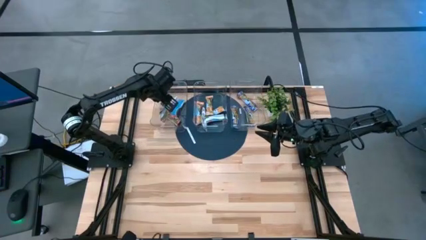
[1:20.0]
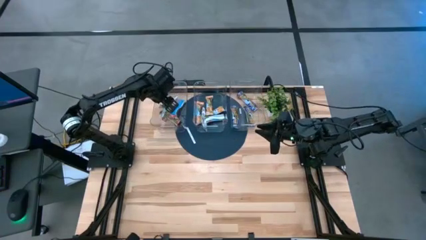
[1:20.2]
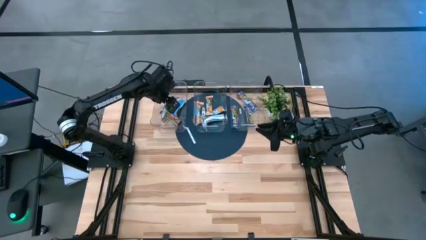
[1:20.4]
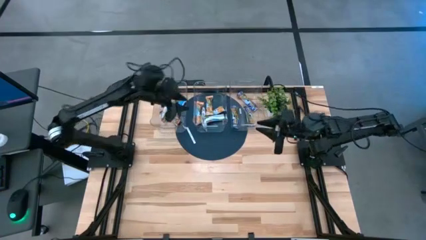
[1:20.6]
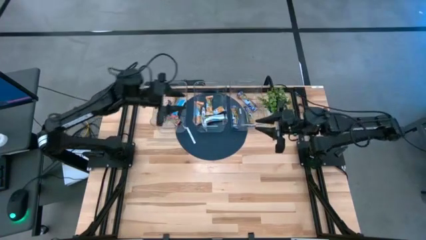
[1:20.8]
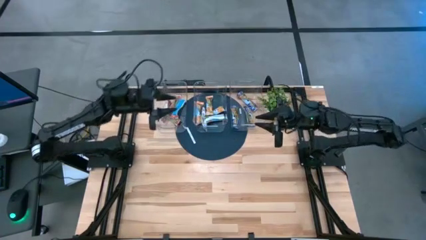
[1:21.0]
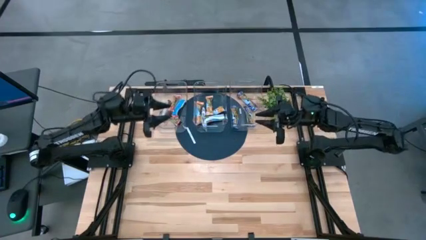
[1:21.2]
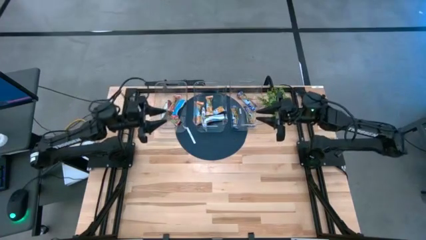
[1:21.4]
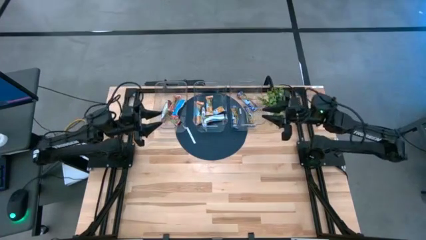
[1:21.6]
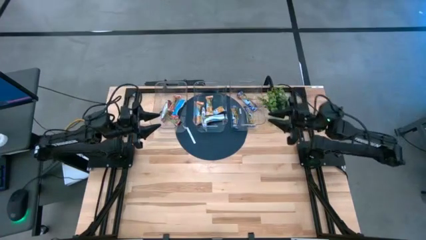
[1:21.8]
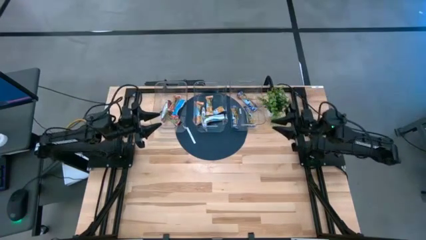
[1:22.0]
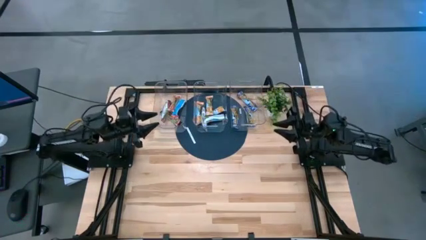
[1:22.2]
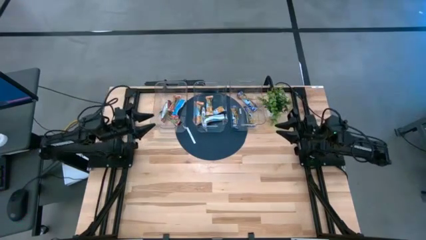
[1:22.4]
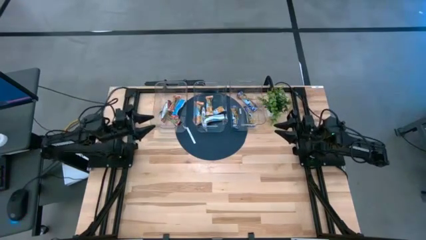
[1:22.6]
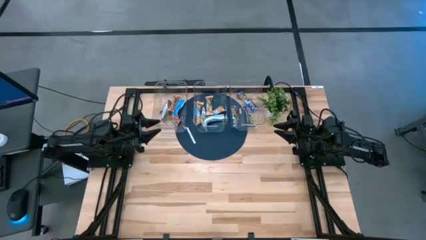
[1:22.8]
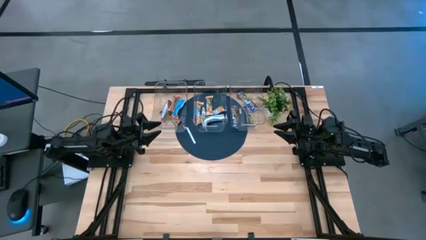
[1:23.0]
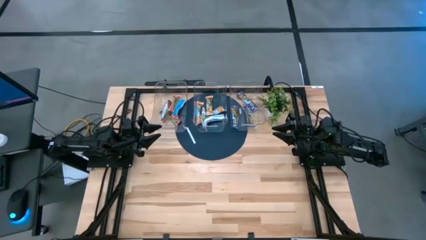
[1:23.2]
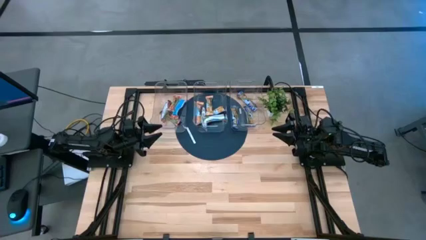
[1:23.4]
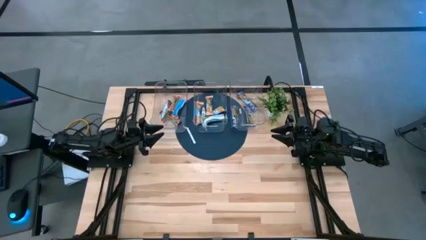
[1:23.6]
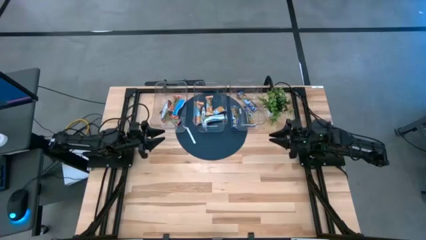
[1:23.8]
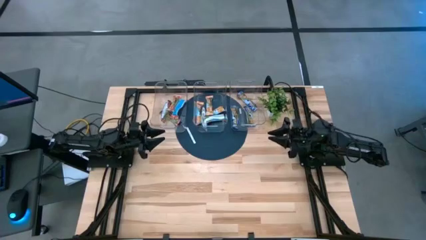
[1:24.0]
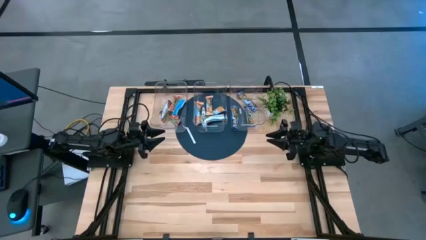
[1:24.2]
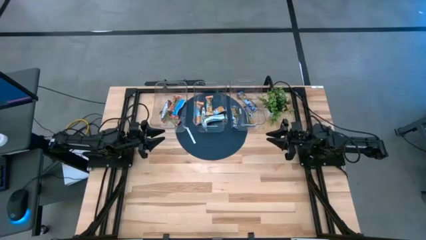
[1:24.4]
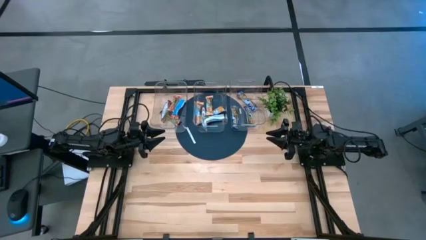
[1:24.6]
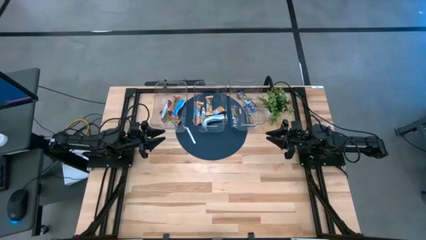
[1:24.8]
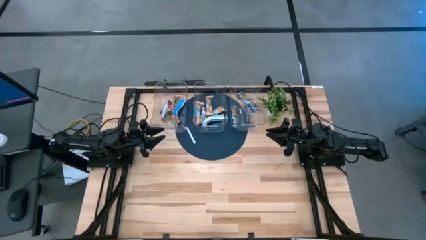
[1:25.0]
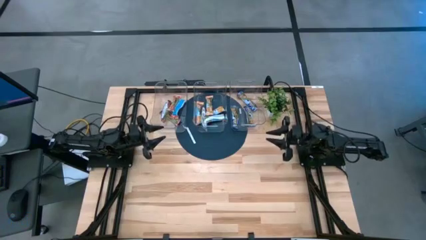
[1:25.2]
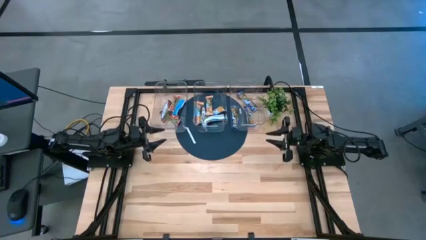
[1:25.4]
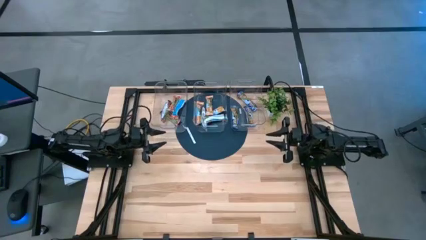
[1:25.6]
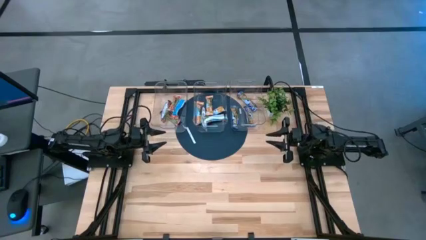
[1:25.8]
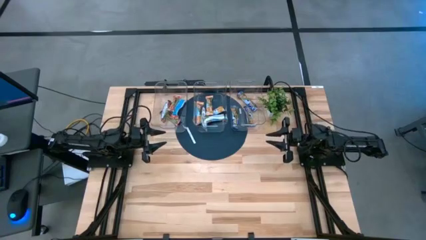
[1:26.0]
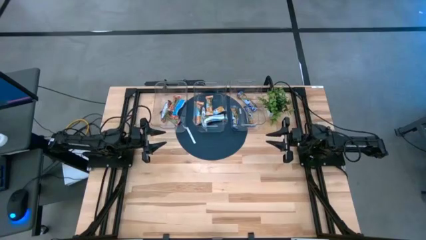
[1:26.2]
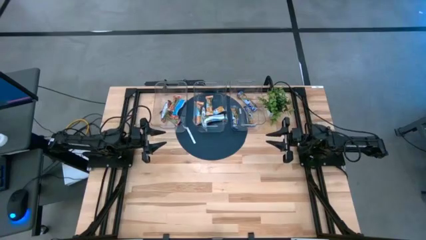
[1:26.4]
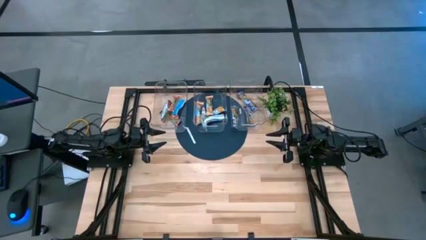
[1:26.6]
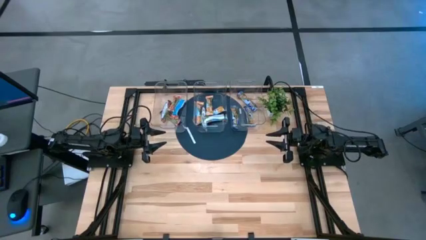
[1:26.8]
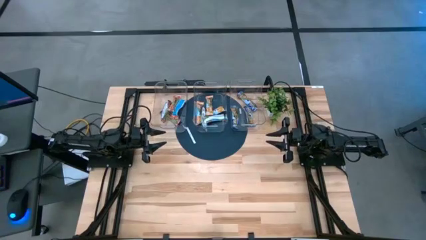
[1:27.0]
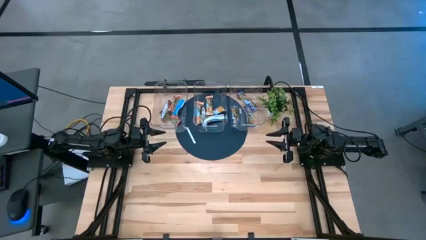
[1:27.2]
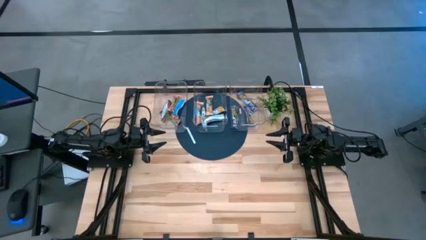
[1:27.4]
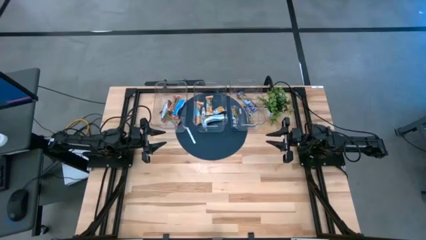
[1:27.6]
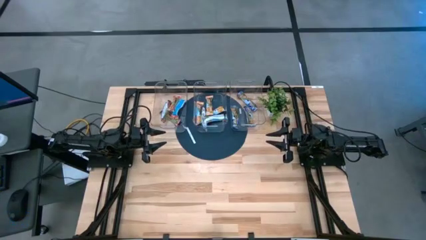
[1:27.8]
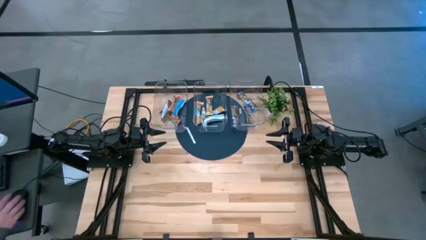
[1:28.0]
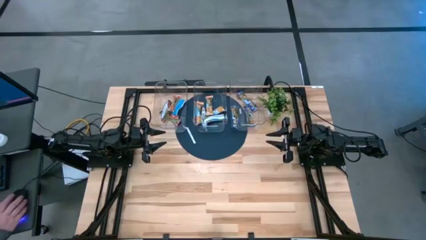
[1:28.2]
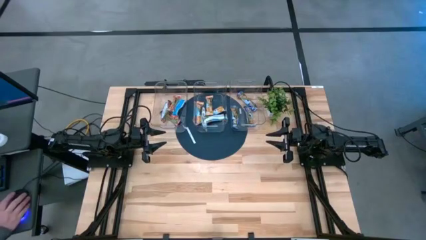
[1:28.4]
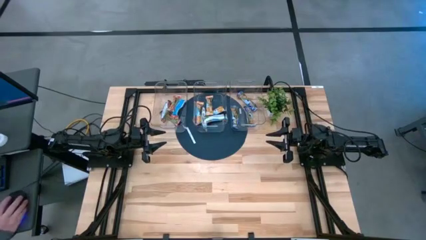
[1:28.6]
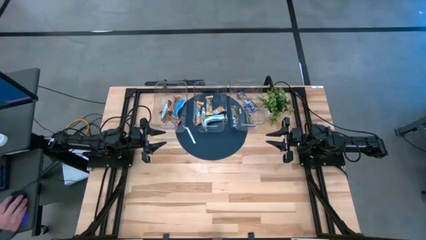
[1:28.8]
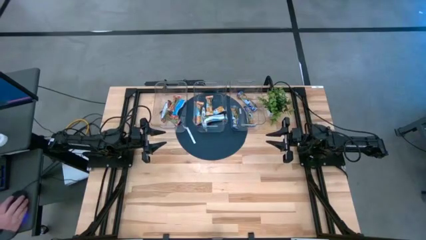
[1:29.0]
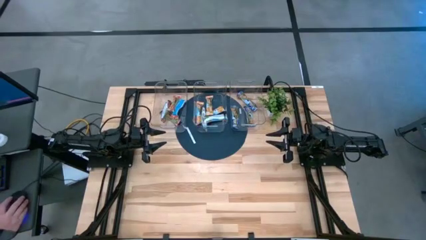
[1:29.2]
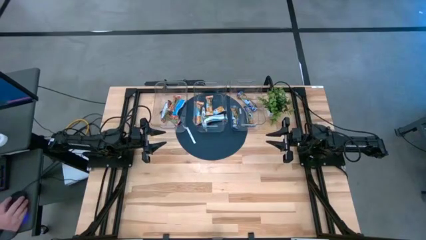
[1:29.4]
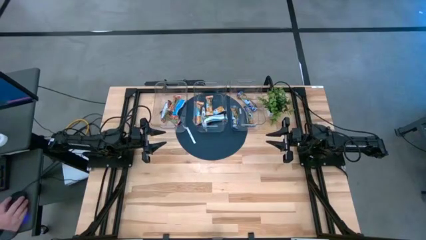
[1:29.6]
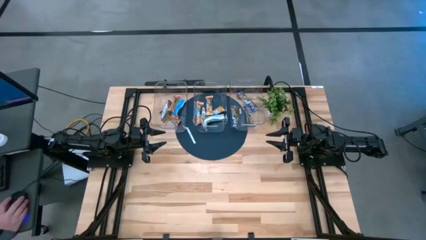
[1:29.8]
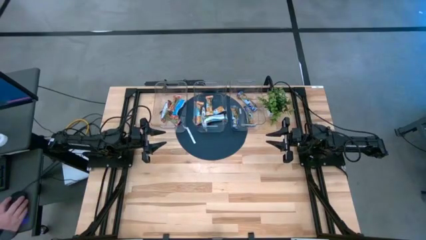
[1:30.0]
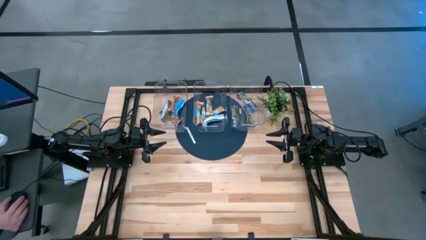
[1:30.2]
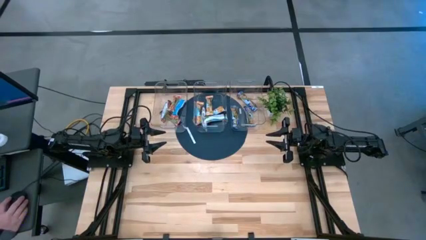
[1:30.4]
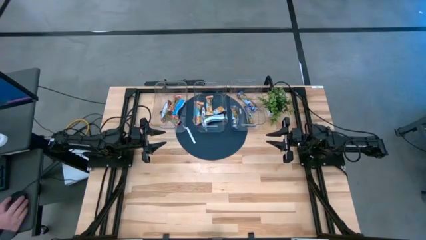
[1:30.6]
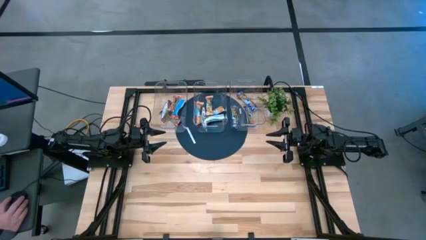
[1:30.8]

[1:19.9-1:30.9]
Task: Pick and place Granola Bars by type
Return to Home Position
